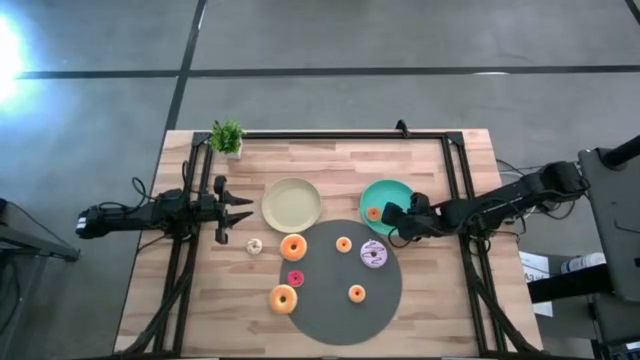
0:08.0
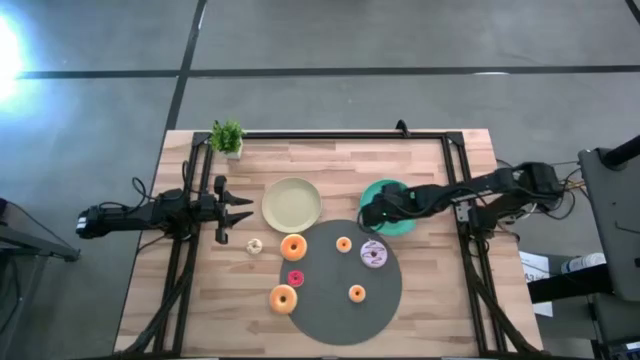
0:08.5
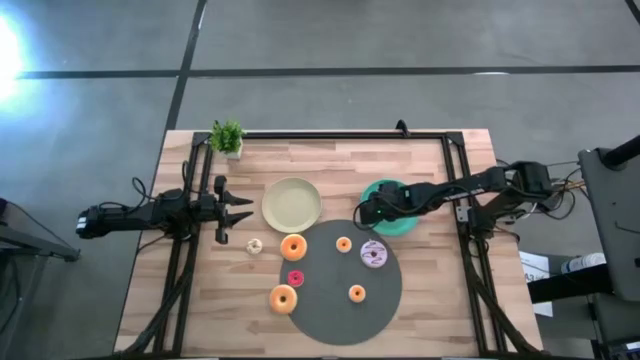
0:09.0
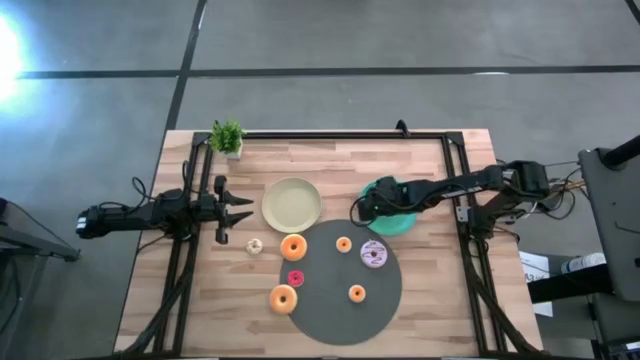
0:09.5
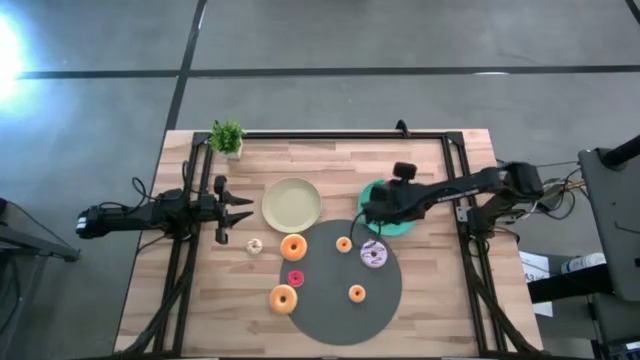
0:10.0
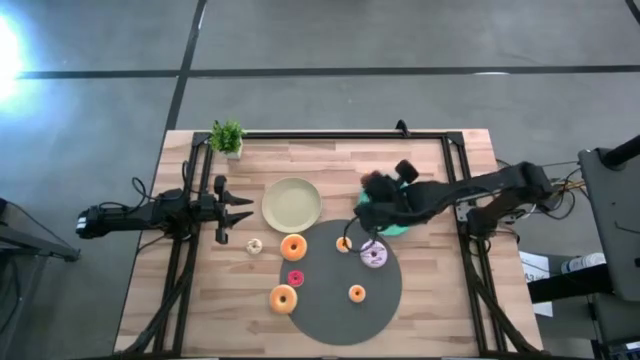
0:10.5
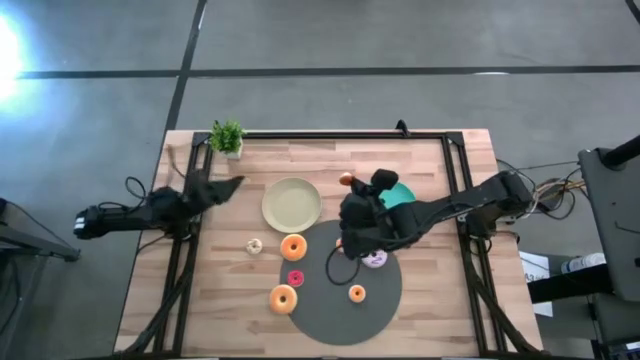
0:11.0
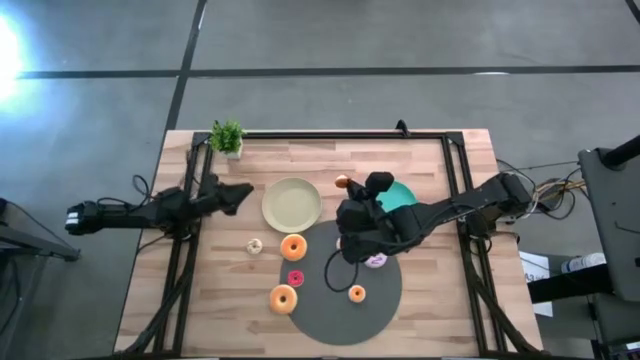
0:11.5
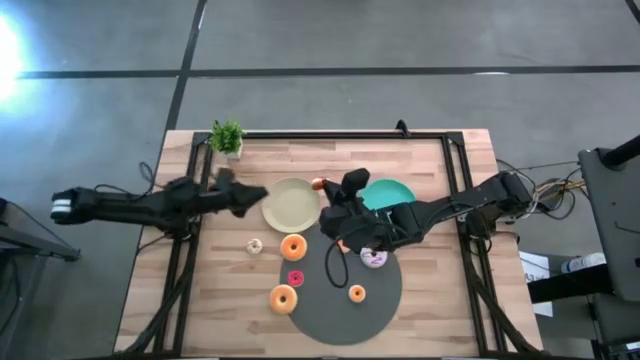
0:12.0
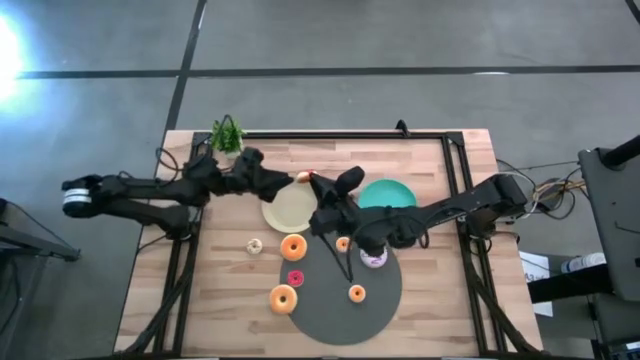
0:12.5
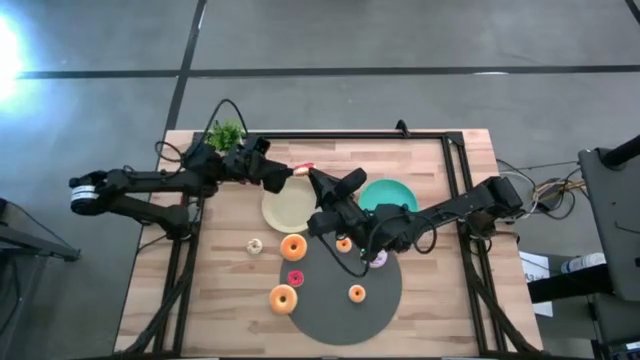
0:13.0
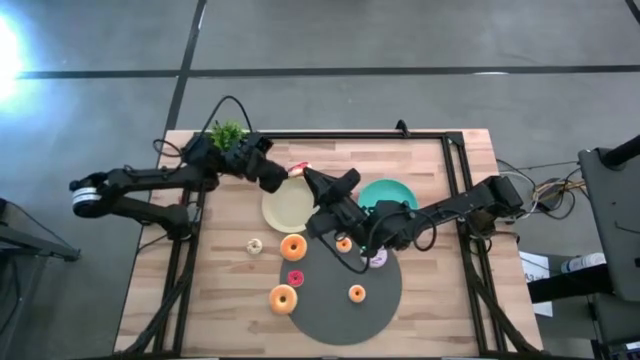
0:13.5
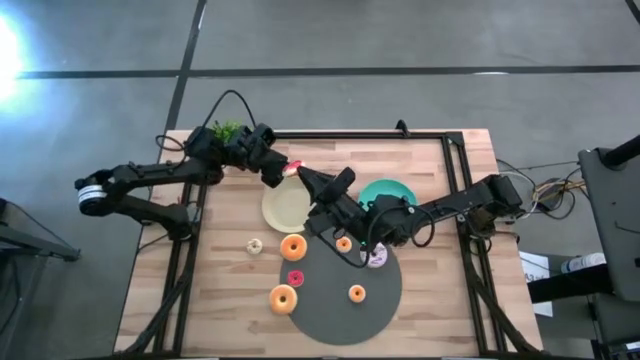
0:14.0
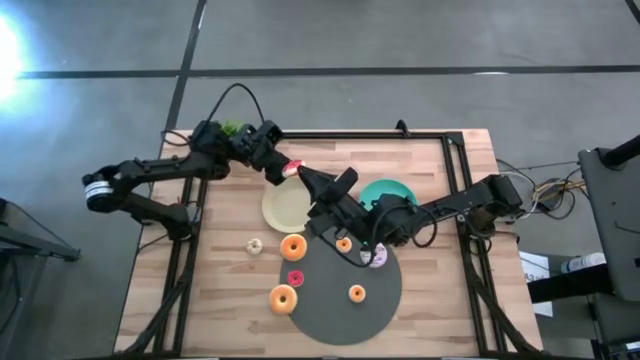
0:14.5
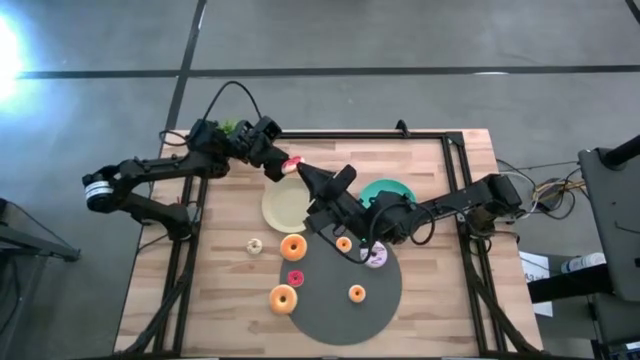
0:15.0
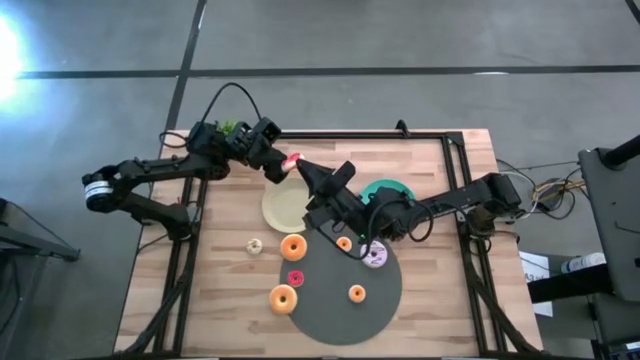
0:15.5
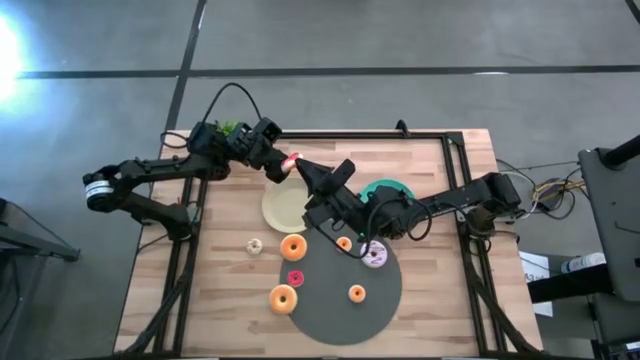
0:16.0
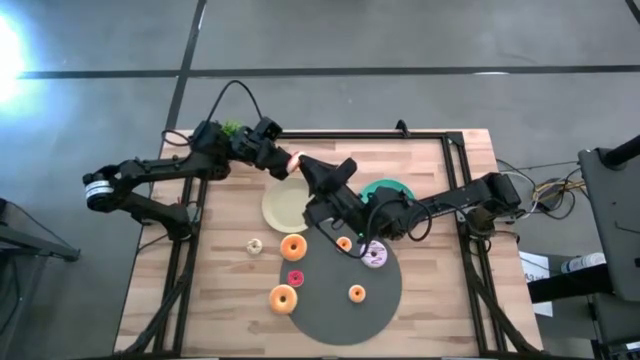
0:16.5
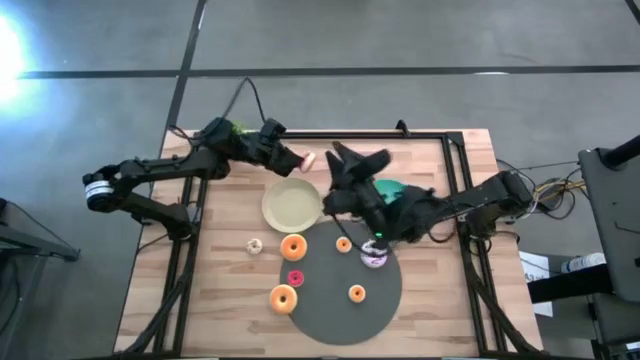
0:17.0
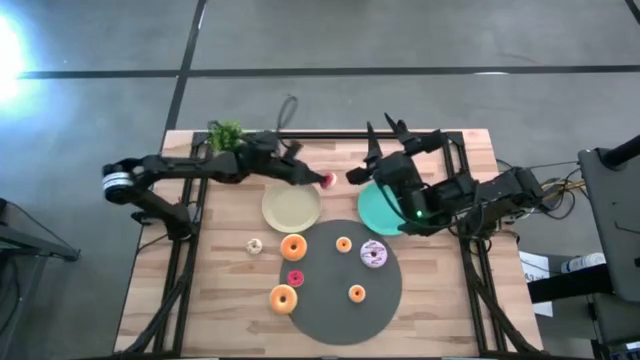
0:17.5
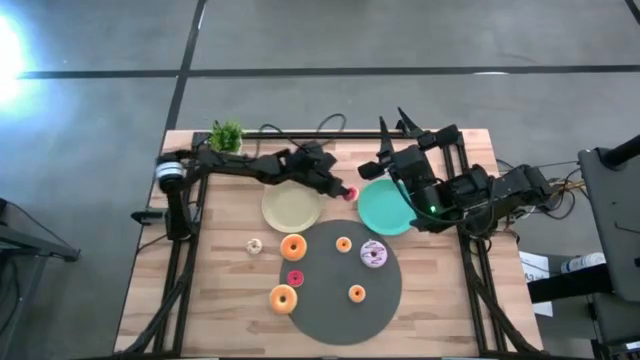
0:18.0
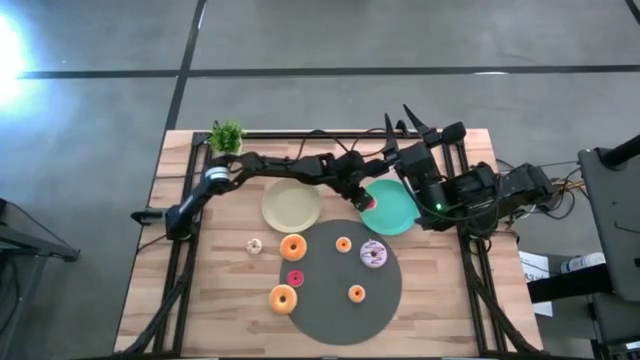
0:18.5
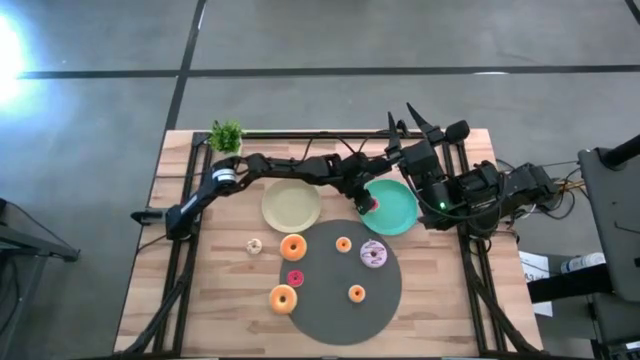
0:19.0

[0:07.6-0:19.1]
Task: Pick & Place donuts
Put the small orange donut on the green plate

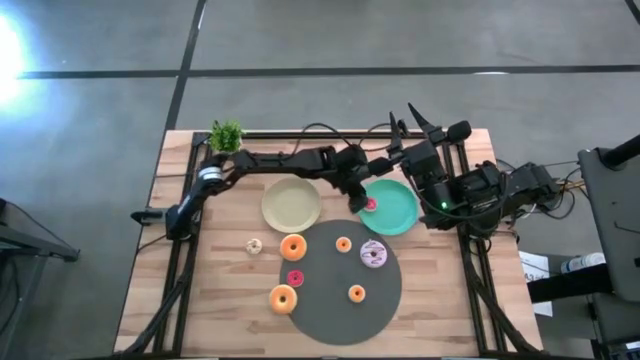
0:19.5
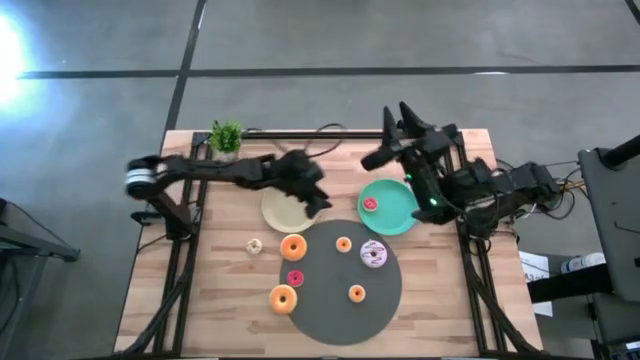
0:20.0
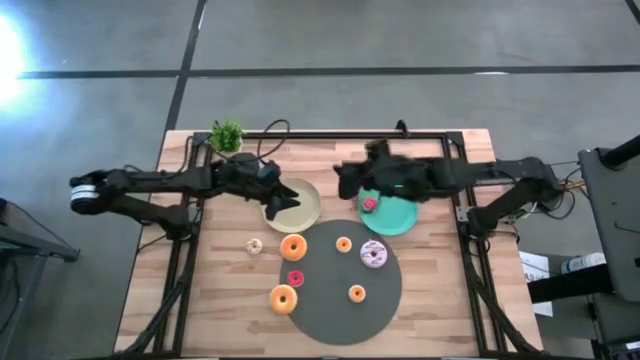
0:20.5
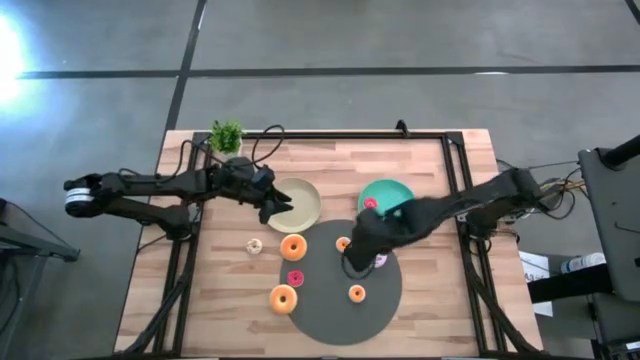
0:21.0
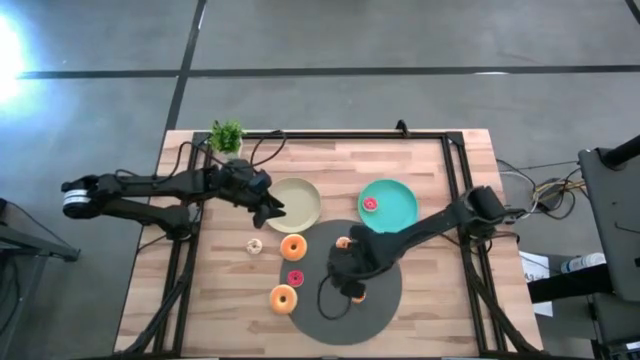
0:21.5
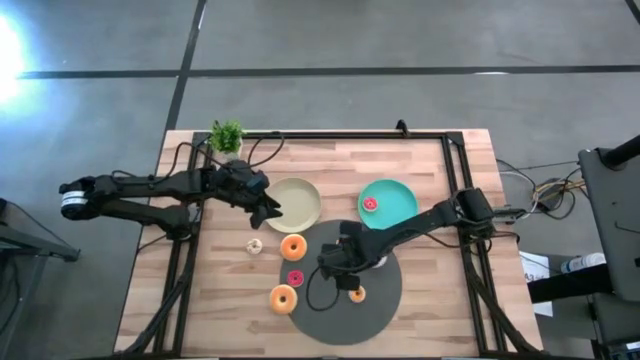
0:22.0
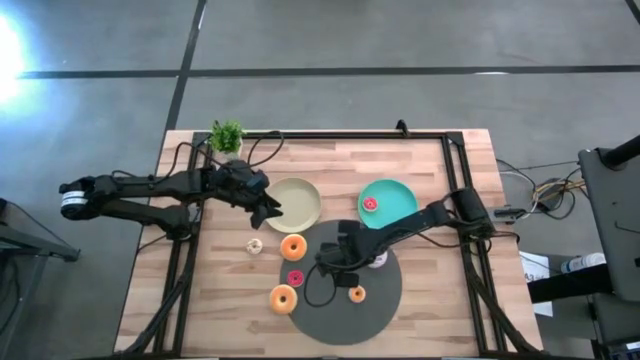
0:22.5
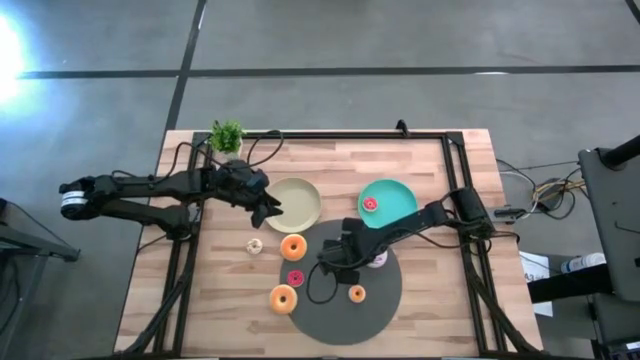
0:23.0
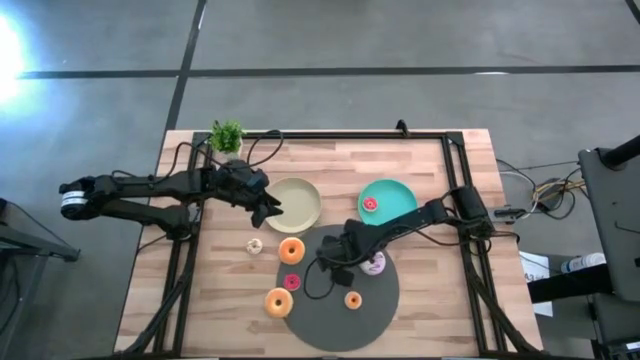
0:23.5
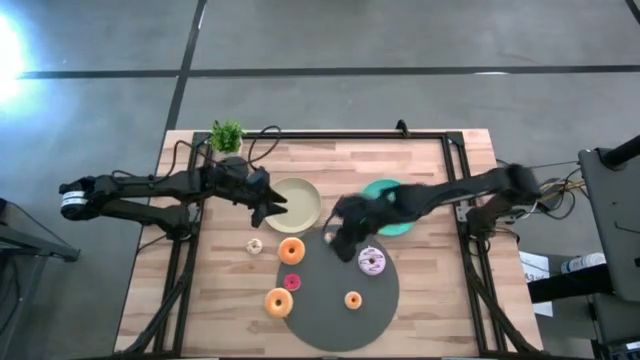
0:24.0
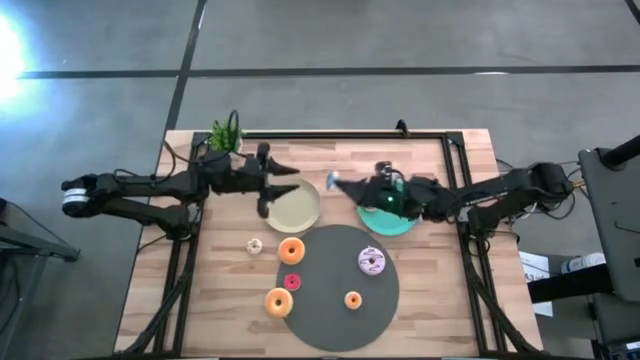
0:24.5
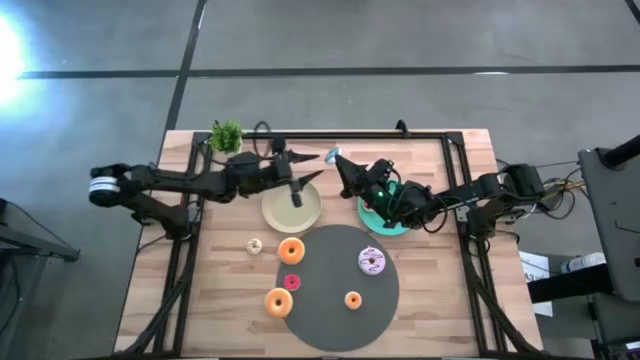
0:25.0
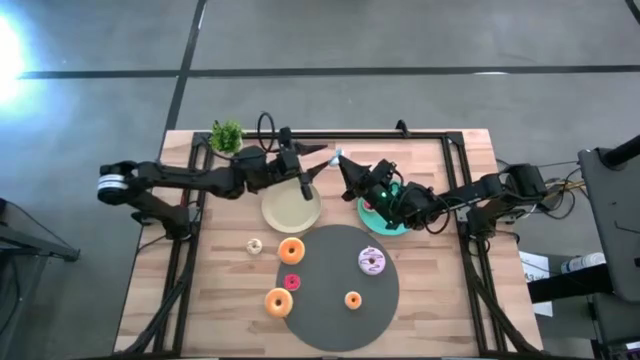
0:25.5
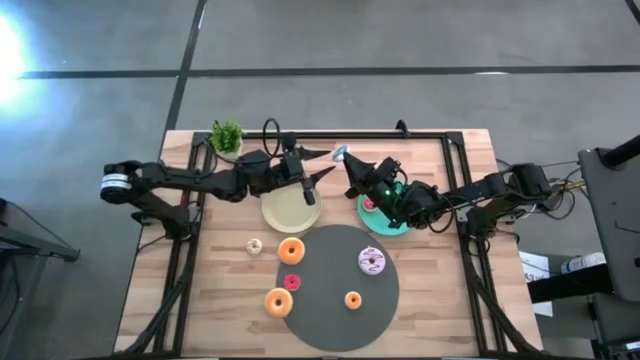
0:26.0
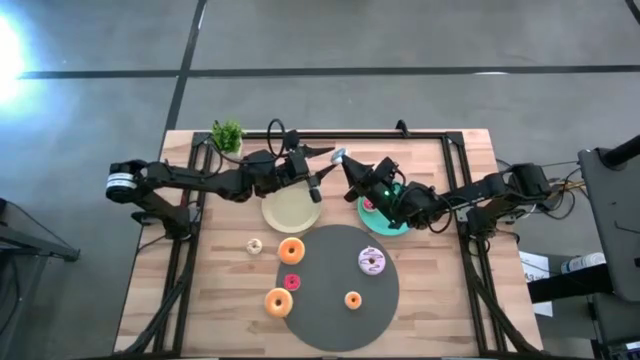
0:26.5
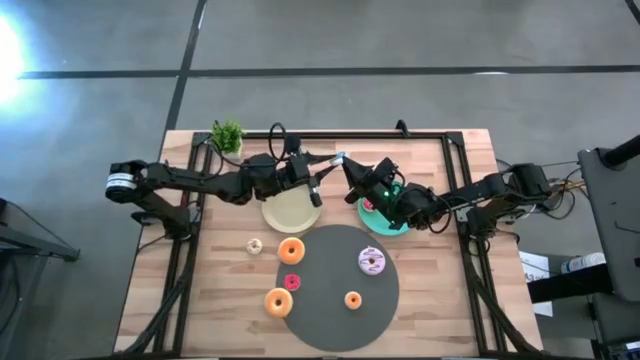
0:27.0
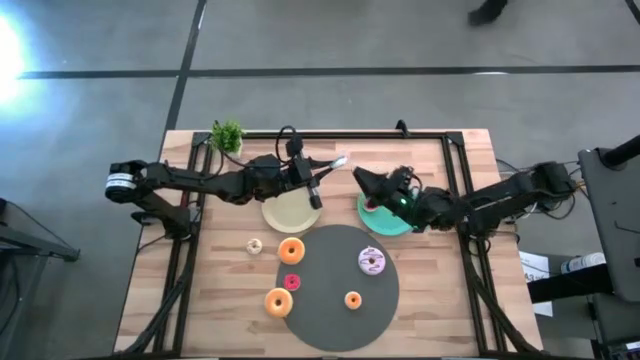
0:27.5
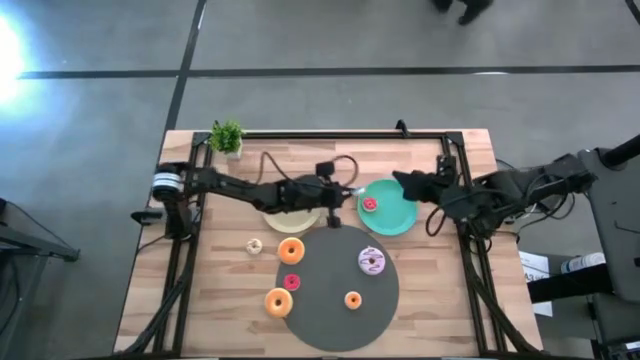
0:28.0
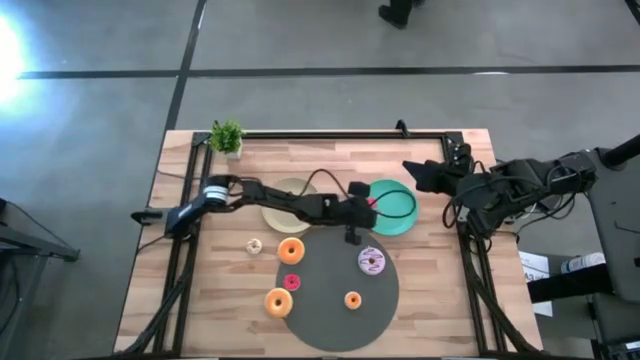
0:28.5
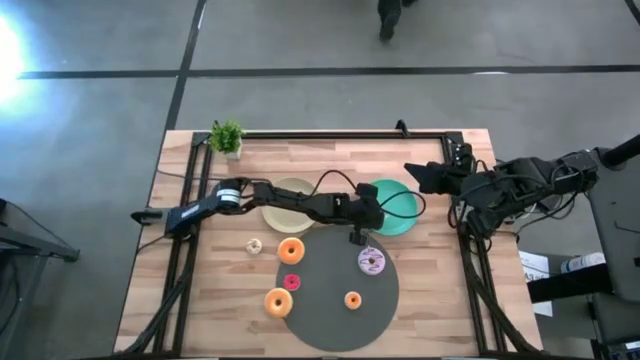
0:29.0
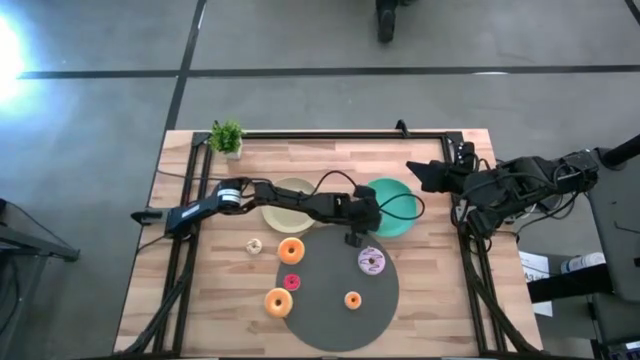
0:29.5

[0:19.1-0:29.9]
Put the small blue donut on the green plate
